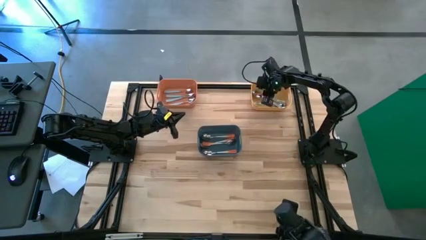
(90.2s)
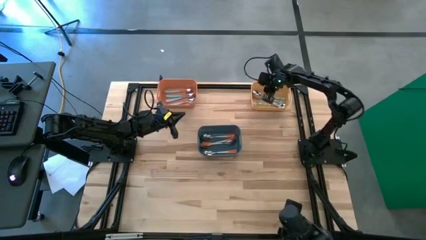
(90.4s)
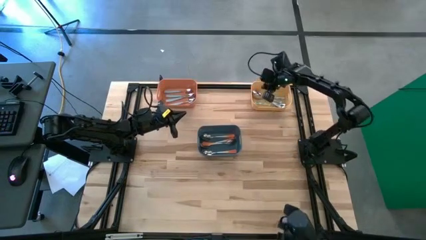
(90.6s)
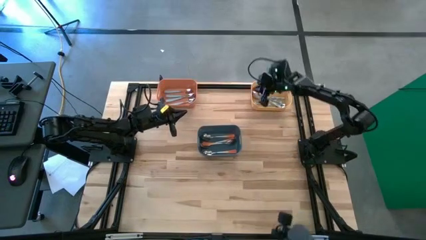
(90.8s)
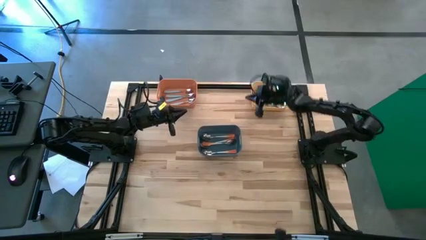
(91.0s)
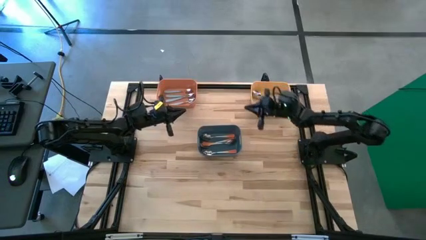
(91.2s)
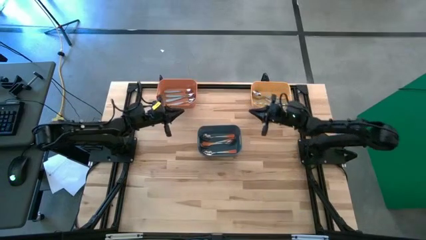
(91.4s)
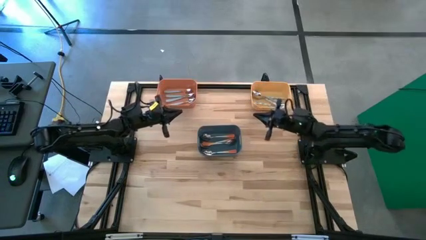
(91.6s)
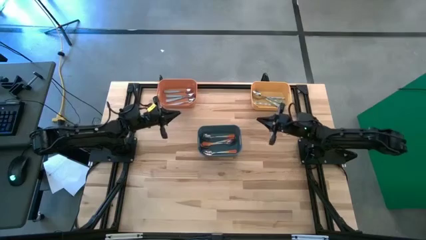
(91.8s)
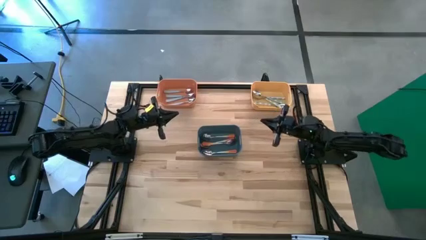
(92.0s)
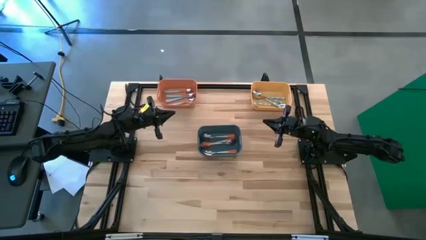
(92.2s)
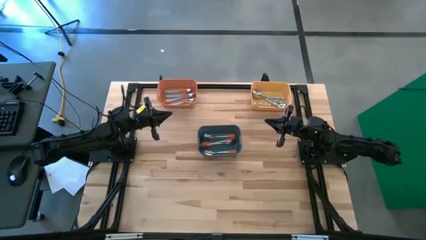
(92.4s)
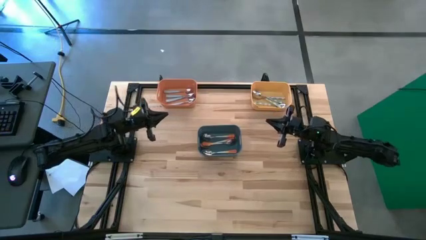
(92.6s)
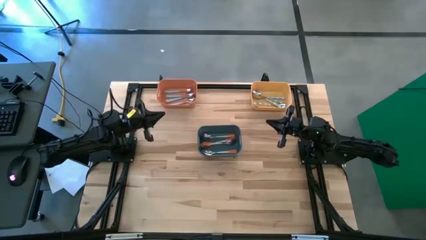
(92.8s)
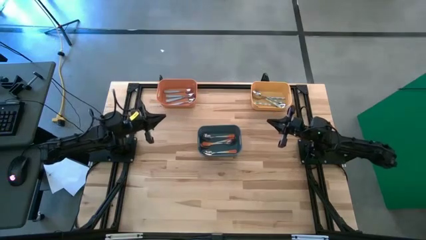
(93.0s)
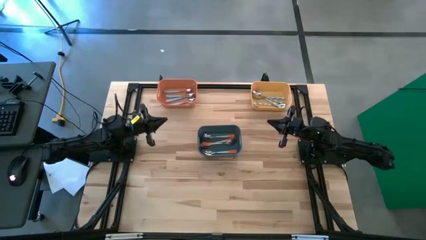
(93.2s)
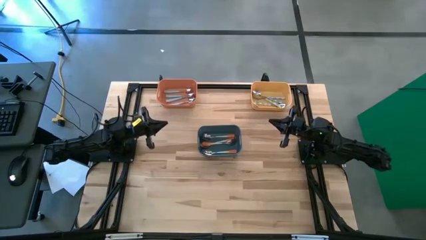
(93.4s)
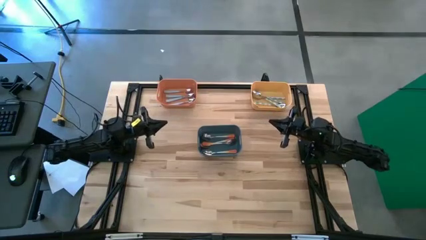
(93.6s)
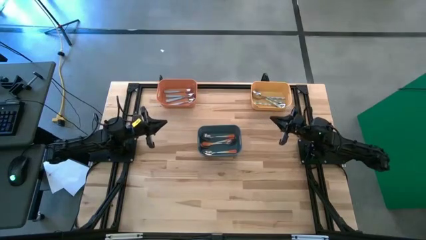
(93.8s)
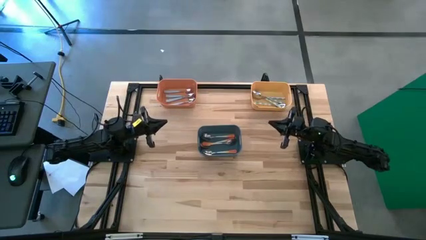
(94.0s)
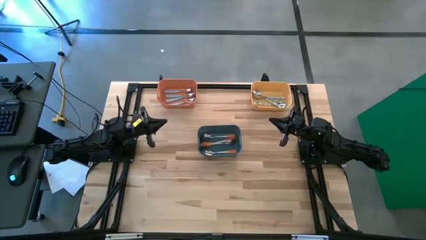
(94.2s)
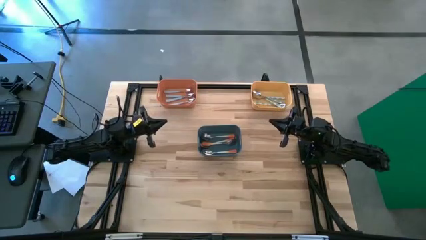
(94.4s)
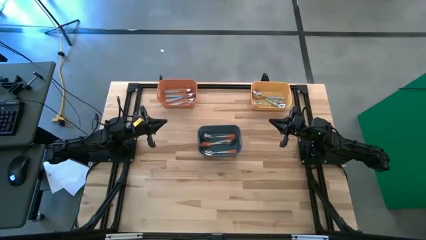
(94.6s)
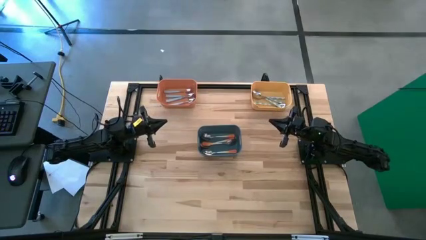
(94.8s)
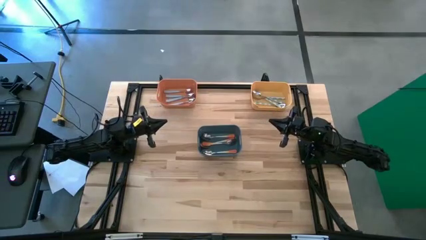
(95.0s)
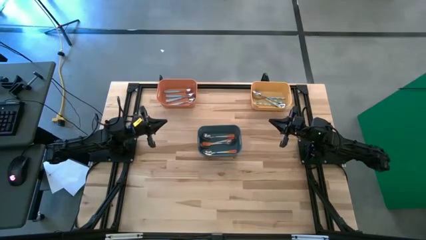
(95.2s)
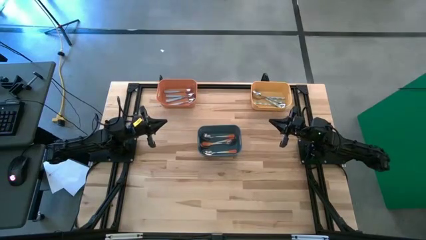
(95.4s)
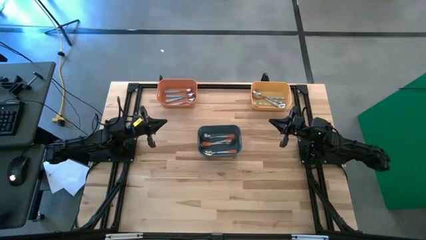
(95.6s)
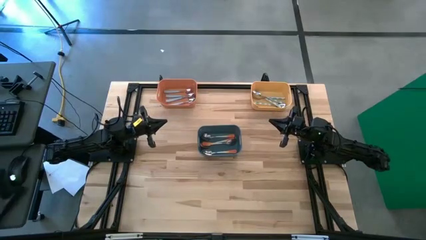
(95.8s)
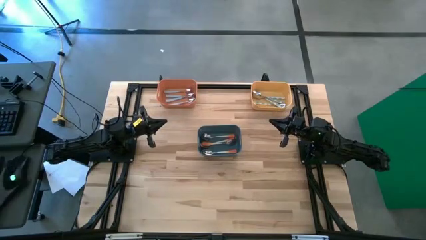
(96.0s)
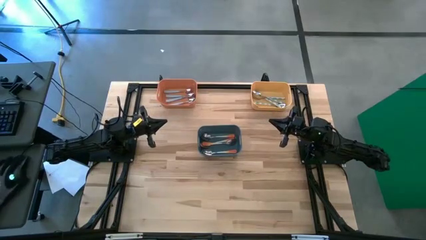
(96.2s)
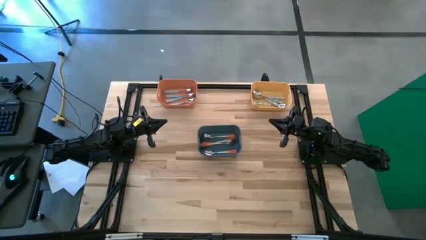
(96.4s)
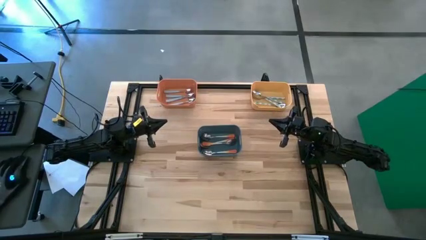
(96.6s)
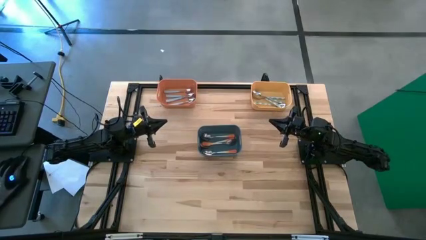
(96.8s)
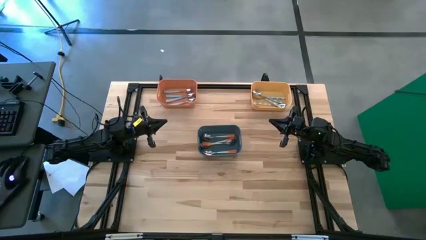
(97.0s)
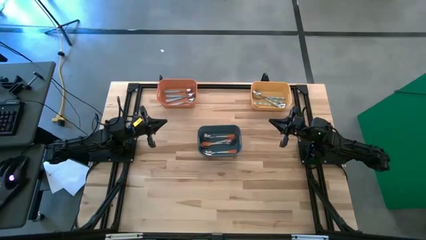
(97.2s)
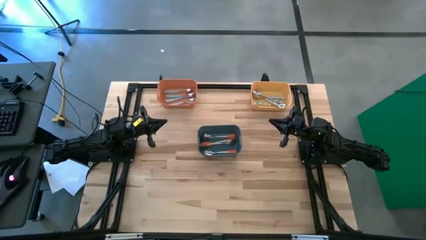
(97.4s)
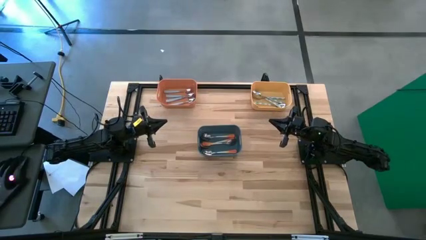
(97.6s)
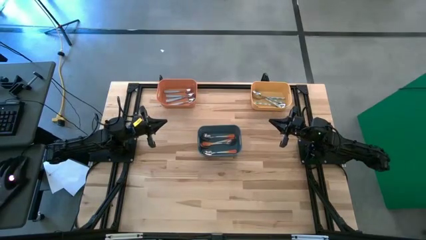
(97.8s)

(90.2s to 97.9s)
Task: Sort silverware by color (type)
Return to Home Position

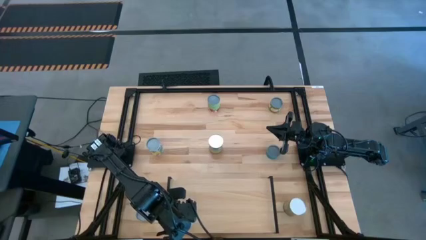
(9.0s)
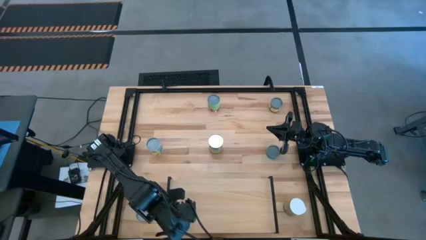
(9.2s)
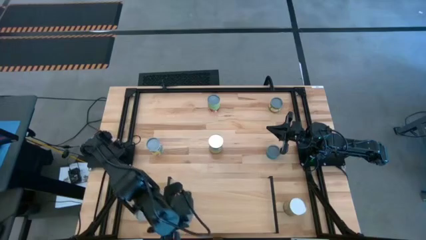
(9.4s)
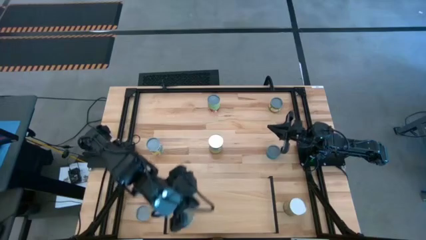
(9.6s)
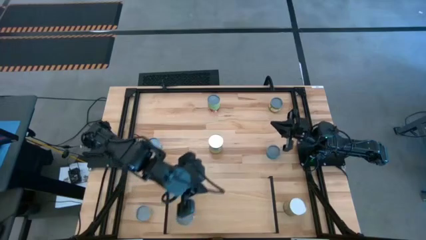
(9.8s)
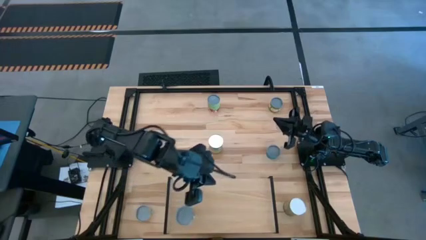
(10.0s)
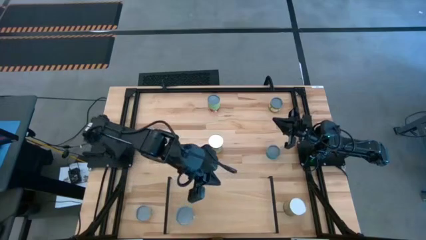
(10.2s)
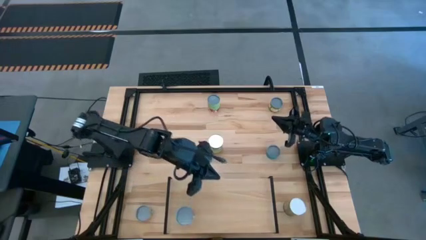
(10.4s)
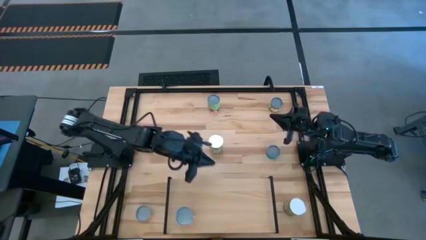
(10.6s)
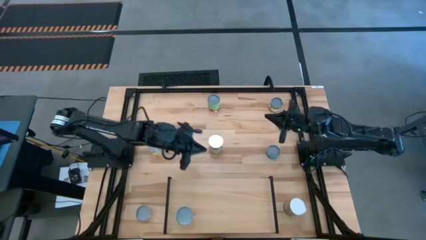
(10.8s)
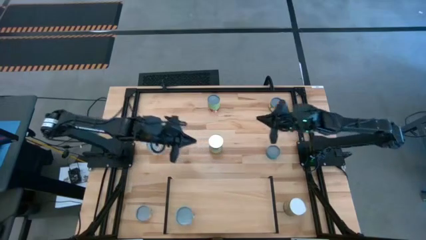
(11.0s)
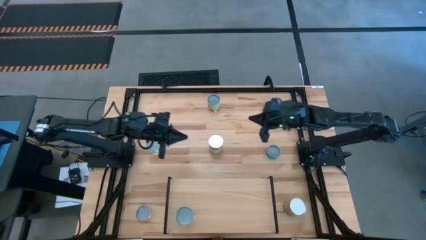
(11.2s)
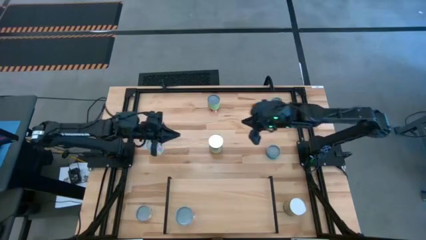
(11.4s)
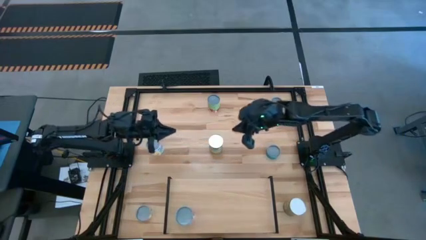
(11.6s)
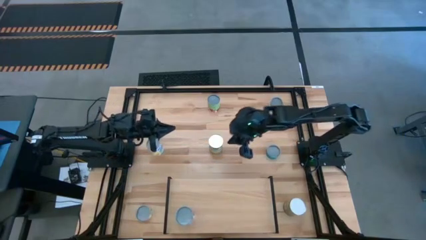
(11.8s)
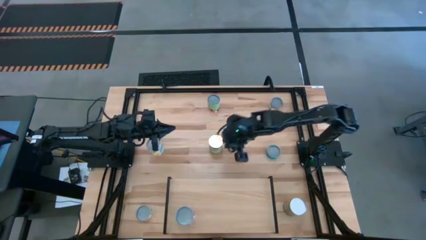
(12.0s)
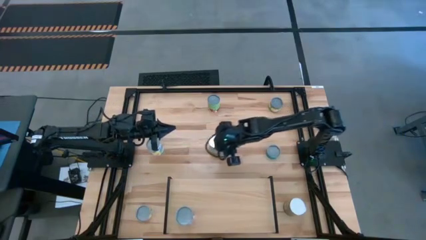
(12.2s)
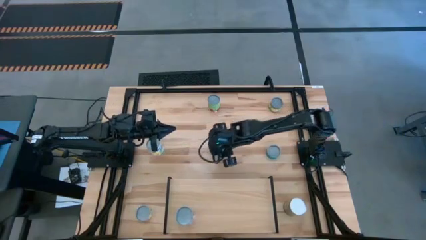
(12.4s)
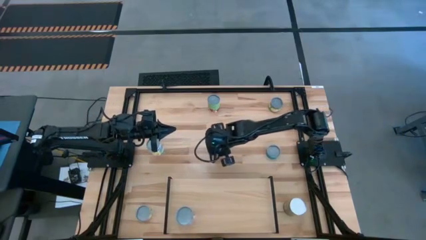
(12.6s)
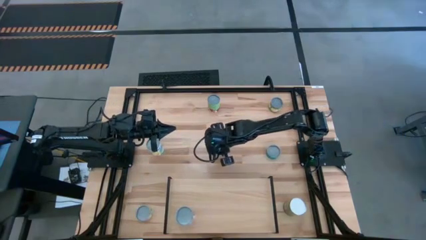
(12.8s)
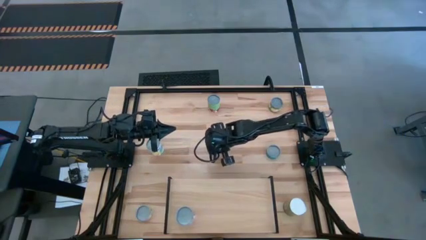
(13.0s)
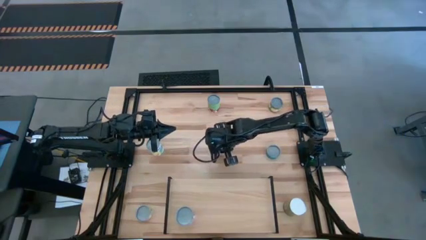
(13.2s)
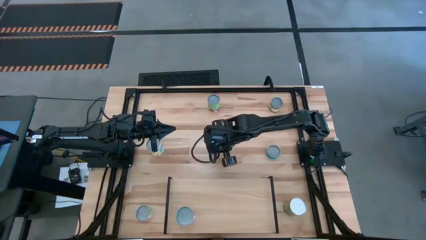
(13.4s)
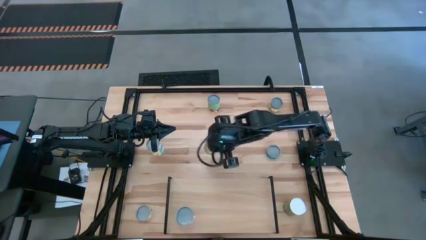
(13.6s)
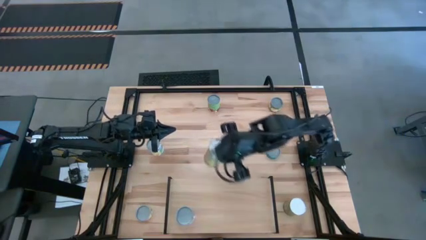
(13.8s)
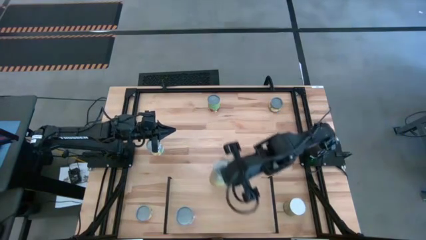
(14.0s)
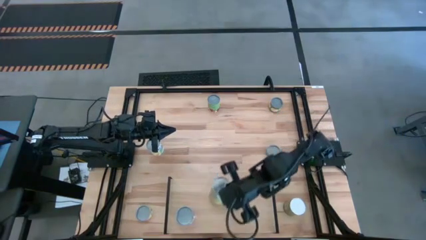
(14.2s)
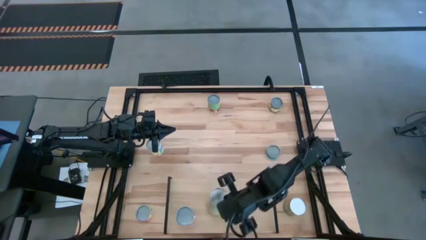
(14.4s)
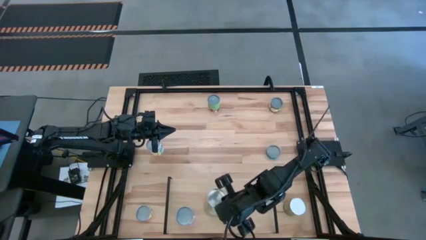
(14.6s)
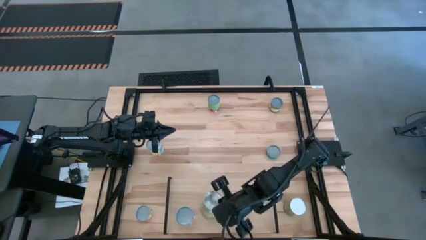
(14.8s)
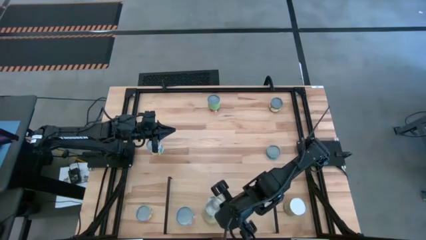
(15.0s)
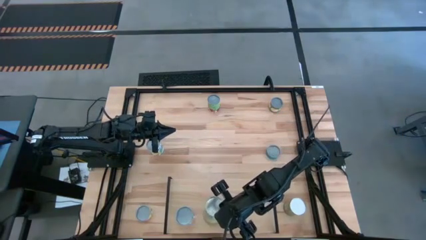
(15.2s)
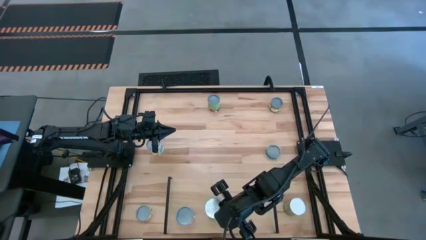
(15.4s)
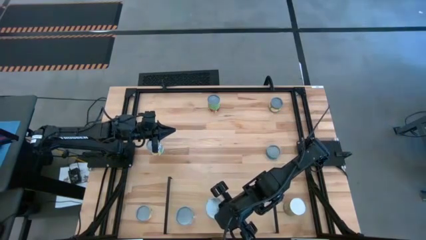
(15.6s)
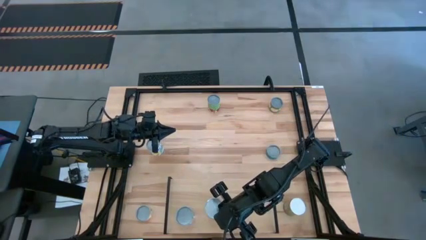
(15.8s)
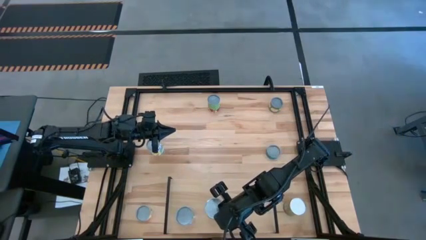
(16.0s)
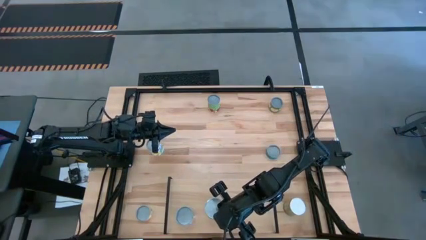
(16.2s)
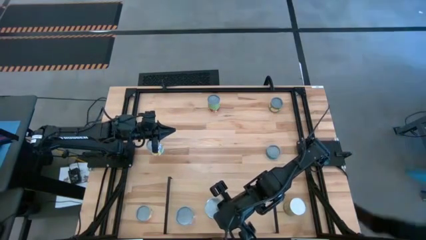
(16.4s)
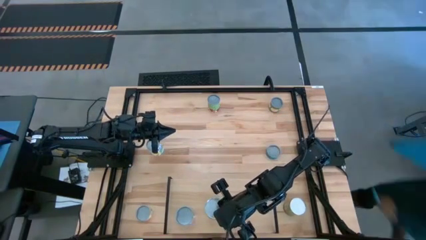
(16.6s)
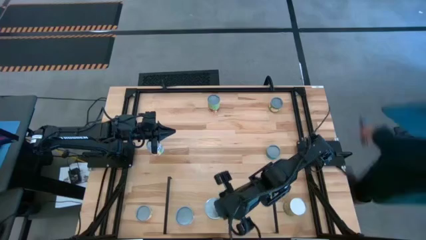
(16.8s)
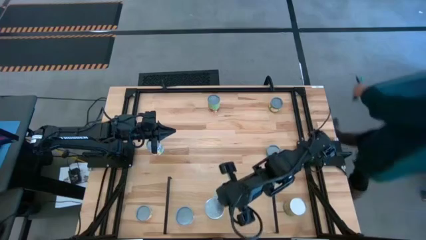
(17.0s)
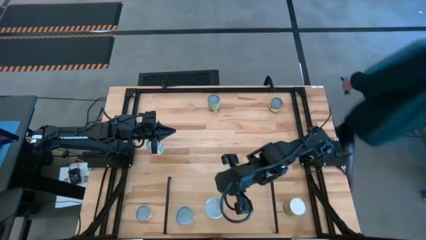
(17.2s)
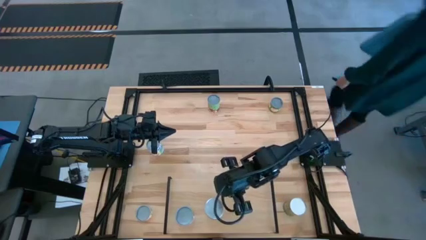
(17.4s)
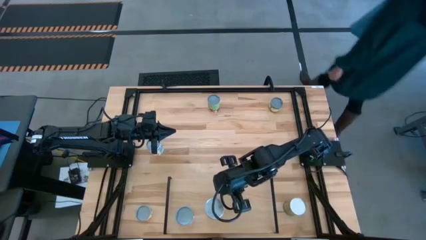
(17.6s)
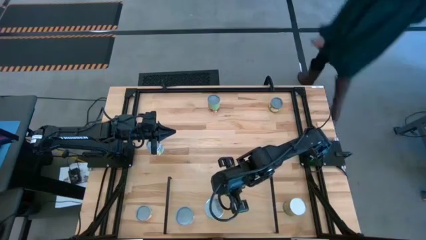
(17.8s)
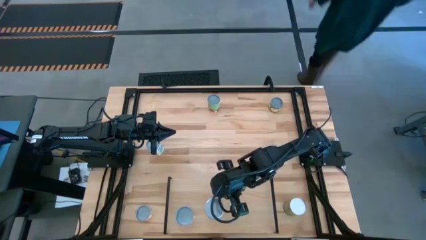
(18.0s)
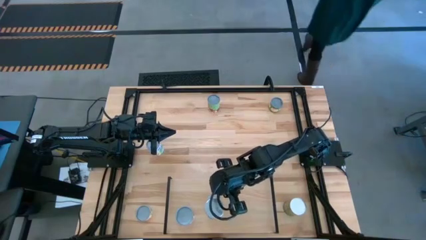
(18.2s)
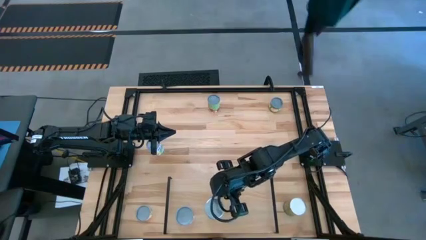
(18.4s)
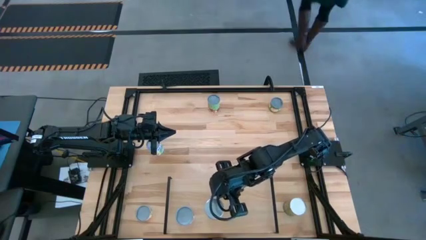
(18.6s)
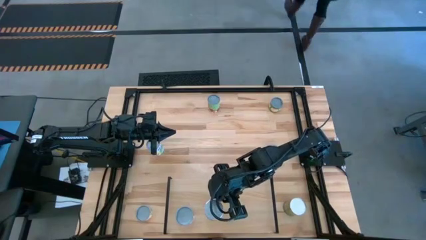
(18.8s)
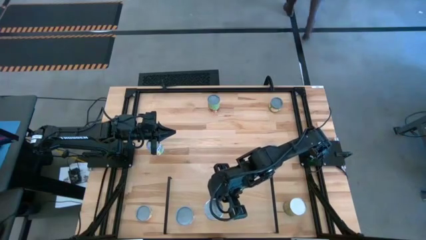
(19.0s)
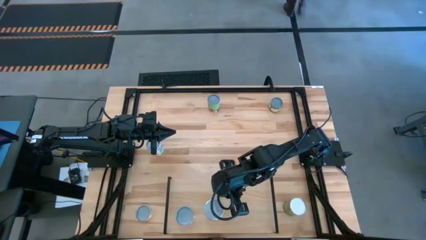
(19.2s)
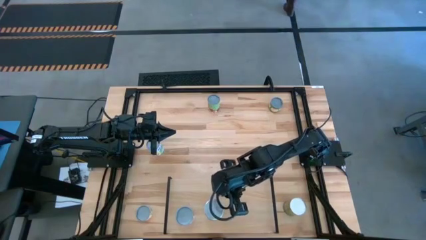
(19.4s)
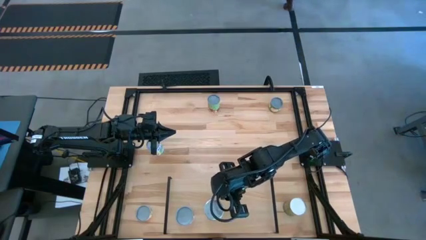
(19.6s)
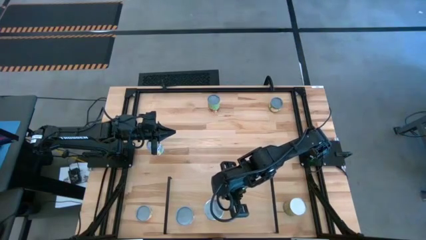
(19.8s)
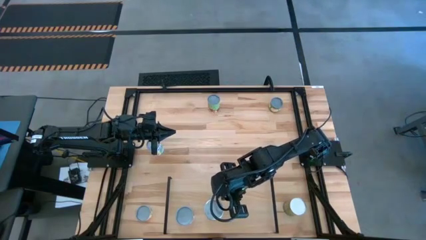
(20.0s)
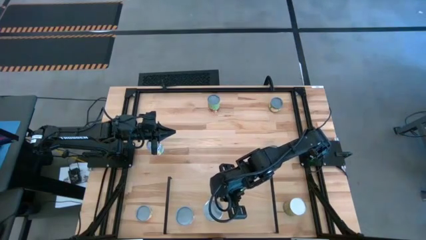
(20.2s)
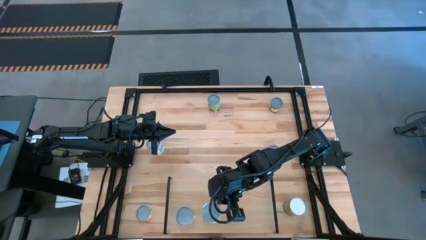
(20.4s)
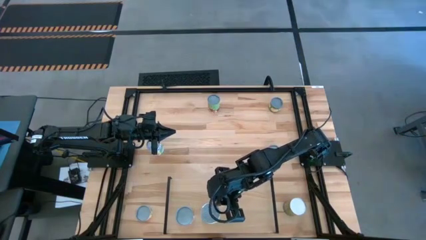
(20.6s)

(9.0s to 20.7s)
Task: Pick and place cans onto a shelf
Put the canned carrots on the shelf
